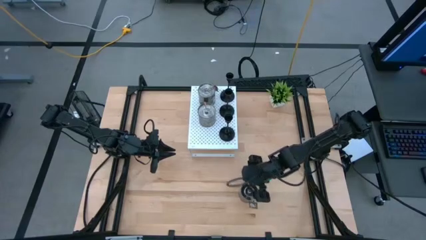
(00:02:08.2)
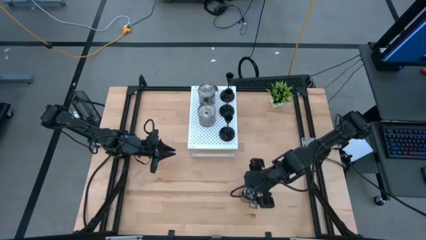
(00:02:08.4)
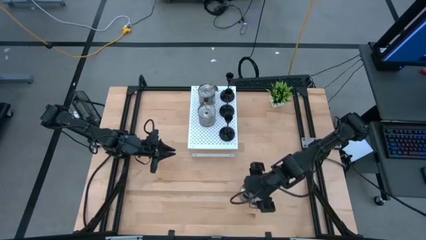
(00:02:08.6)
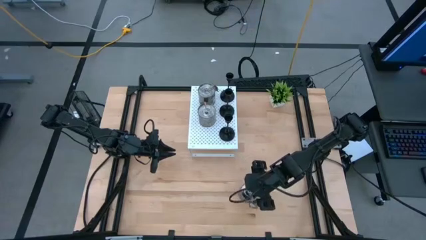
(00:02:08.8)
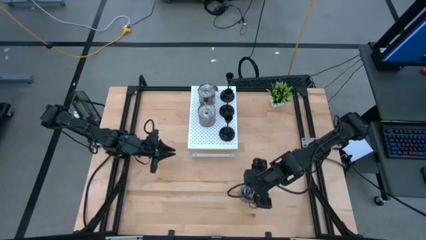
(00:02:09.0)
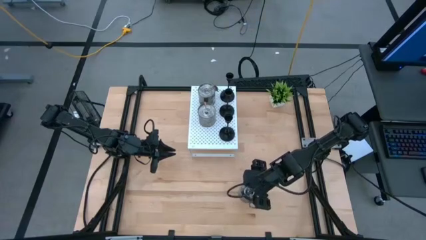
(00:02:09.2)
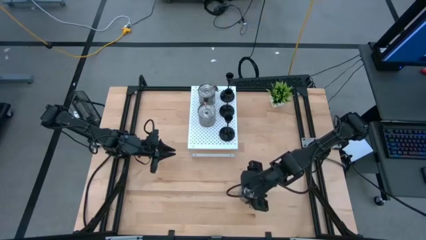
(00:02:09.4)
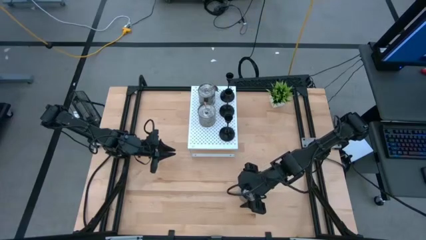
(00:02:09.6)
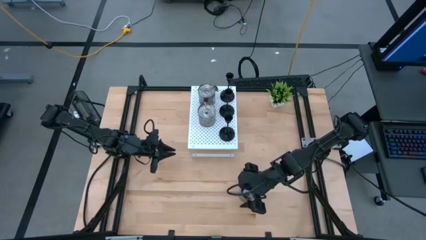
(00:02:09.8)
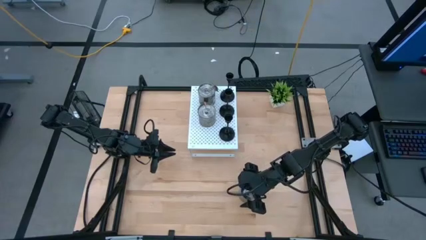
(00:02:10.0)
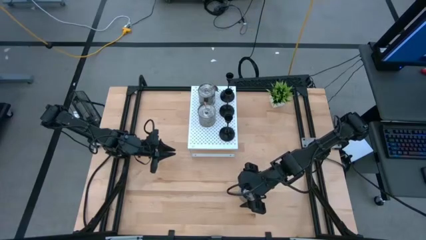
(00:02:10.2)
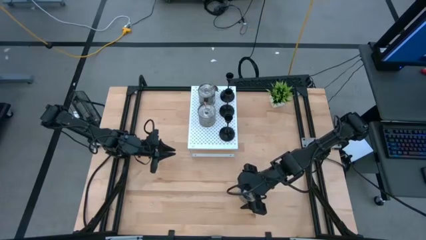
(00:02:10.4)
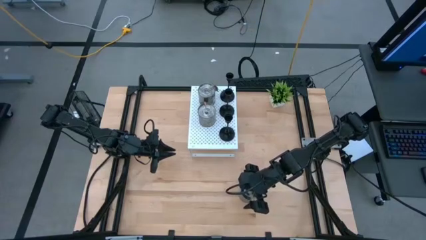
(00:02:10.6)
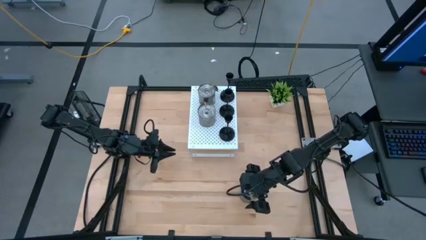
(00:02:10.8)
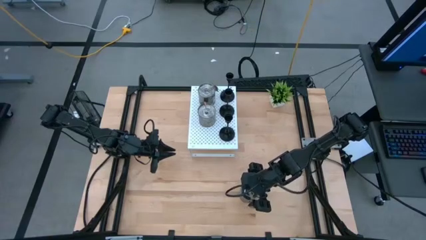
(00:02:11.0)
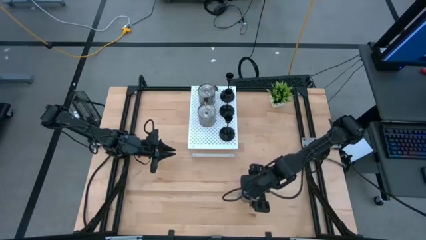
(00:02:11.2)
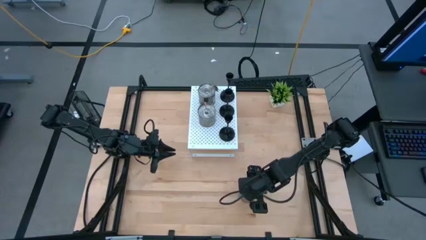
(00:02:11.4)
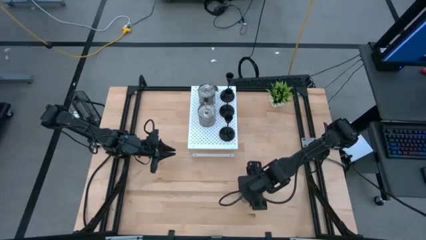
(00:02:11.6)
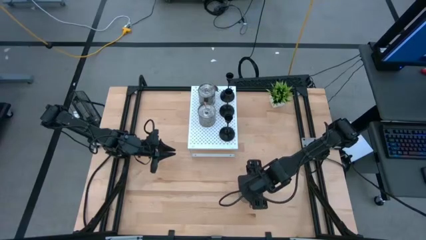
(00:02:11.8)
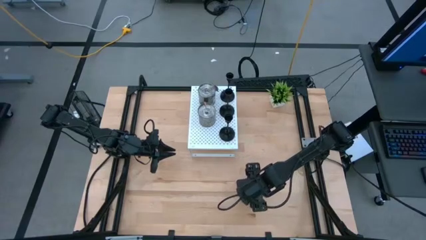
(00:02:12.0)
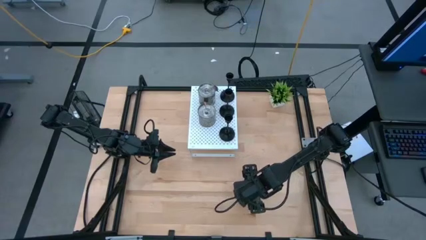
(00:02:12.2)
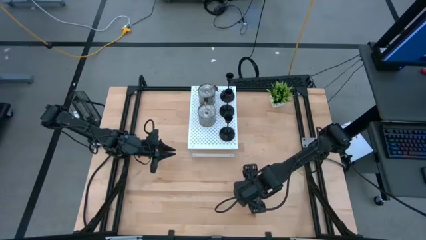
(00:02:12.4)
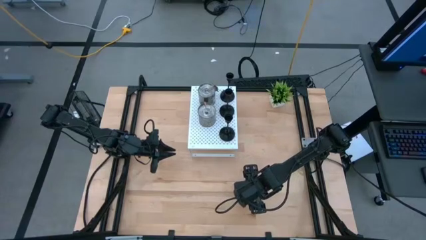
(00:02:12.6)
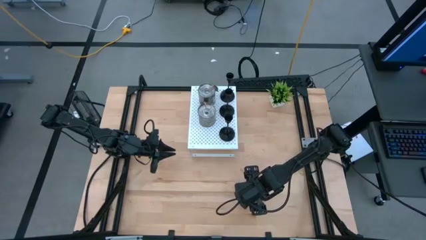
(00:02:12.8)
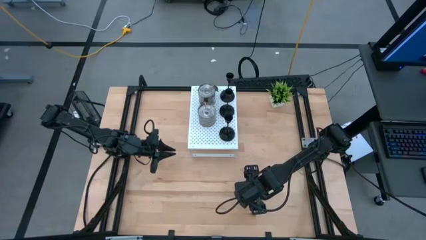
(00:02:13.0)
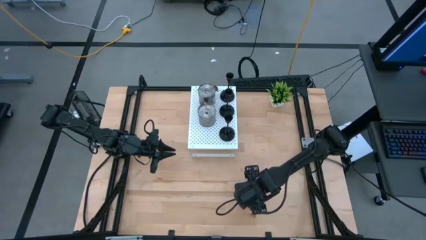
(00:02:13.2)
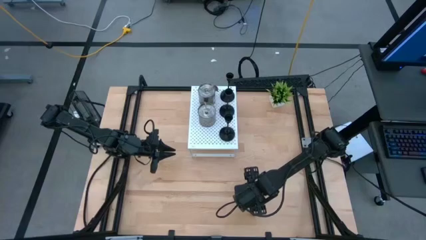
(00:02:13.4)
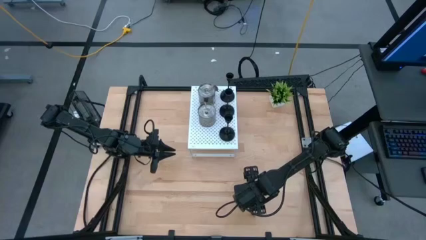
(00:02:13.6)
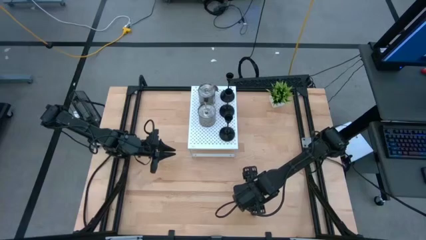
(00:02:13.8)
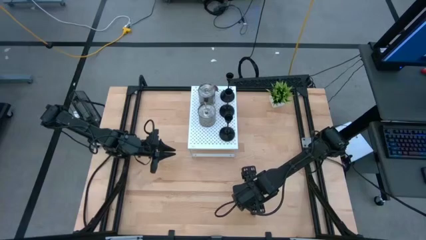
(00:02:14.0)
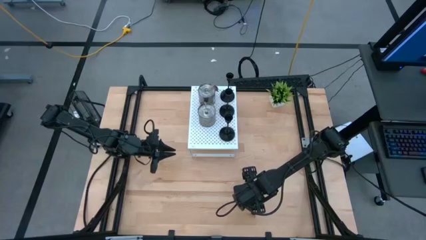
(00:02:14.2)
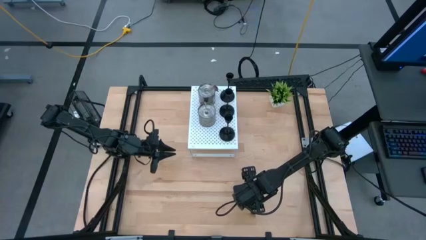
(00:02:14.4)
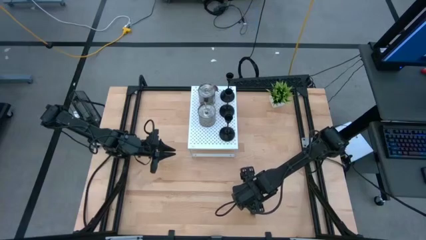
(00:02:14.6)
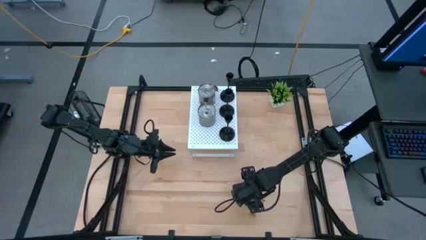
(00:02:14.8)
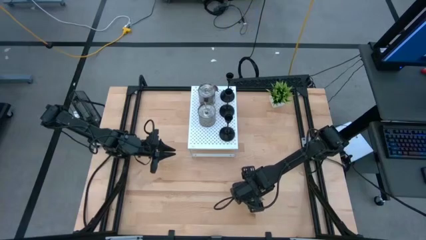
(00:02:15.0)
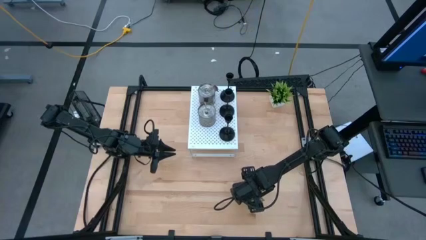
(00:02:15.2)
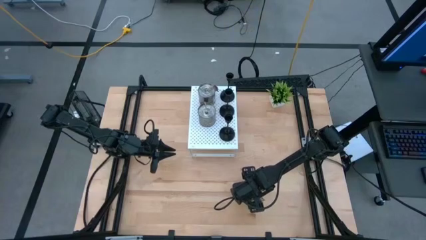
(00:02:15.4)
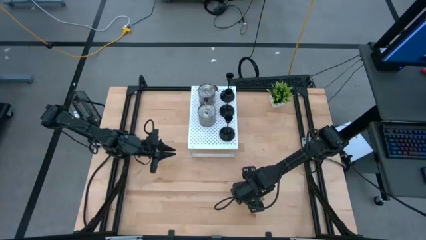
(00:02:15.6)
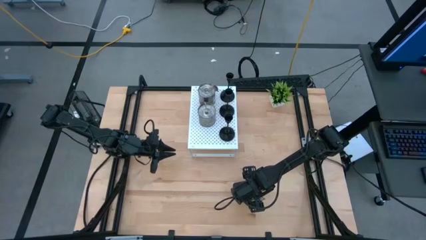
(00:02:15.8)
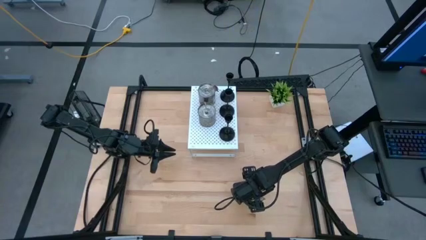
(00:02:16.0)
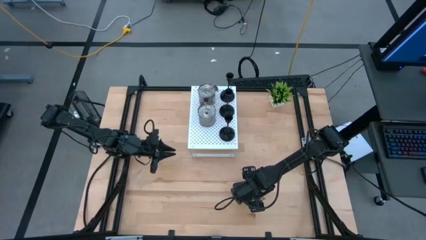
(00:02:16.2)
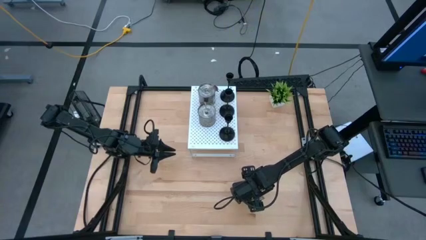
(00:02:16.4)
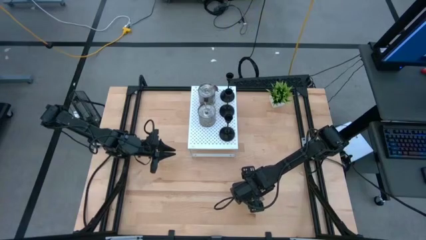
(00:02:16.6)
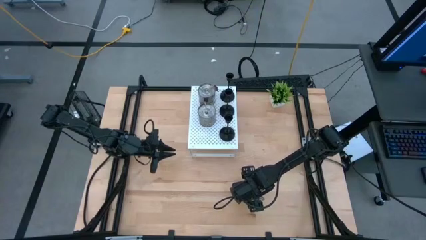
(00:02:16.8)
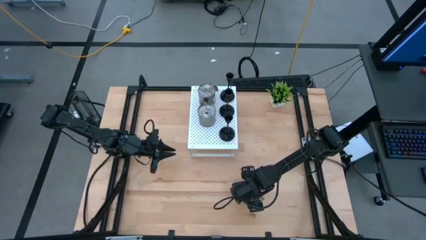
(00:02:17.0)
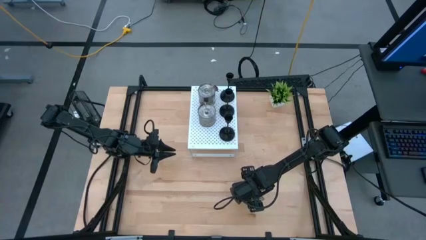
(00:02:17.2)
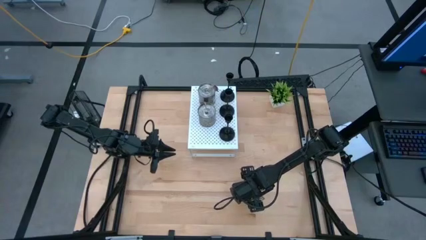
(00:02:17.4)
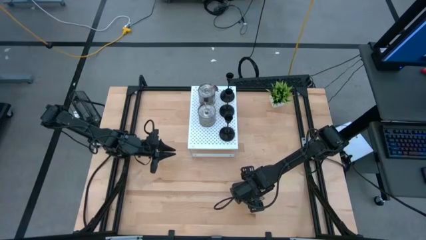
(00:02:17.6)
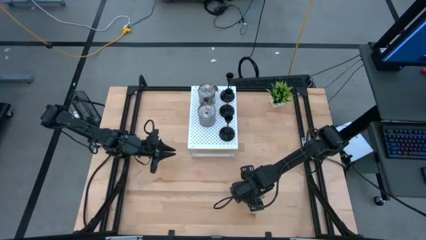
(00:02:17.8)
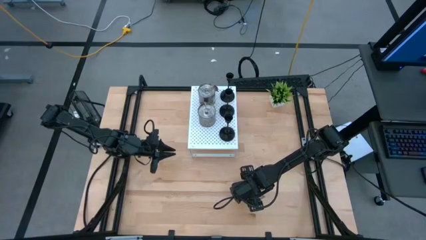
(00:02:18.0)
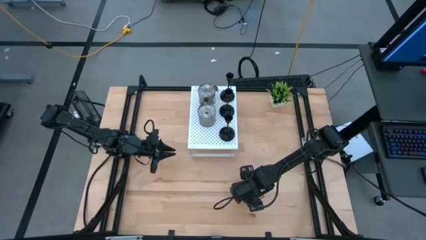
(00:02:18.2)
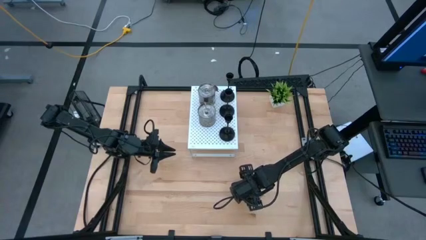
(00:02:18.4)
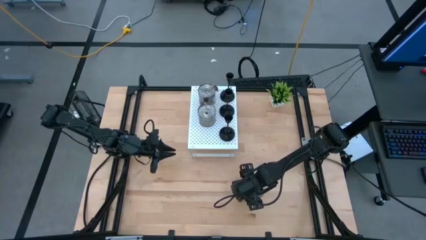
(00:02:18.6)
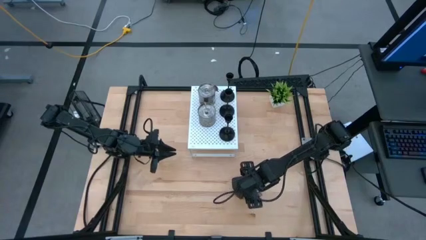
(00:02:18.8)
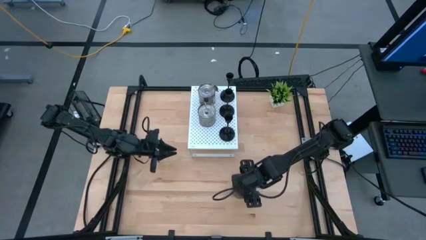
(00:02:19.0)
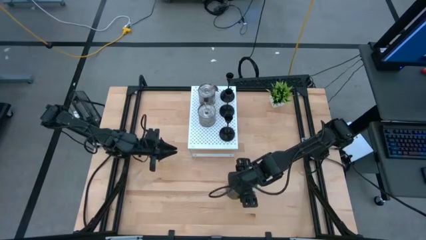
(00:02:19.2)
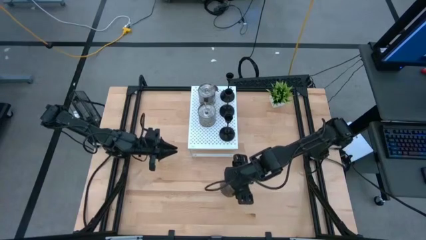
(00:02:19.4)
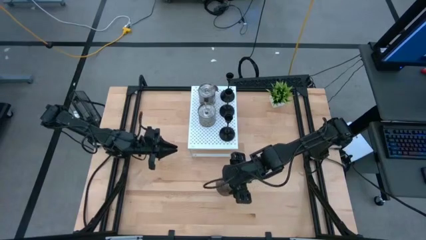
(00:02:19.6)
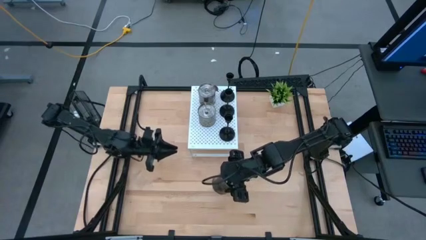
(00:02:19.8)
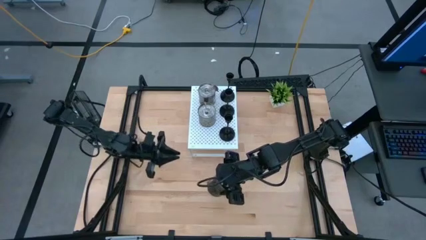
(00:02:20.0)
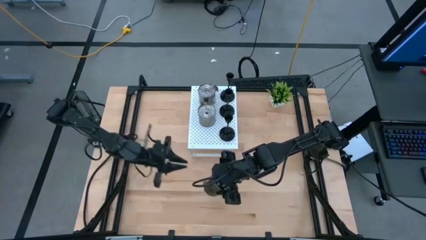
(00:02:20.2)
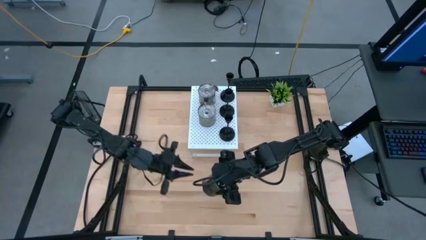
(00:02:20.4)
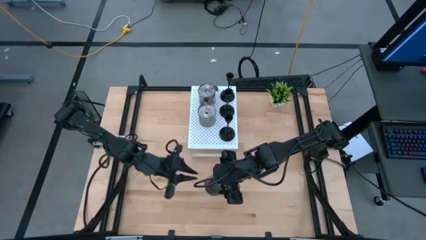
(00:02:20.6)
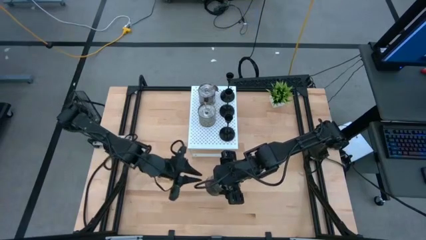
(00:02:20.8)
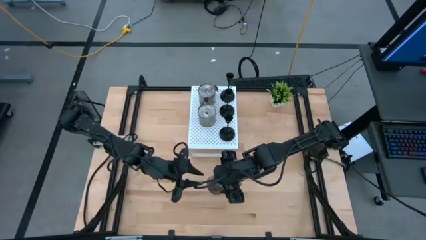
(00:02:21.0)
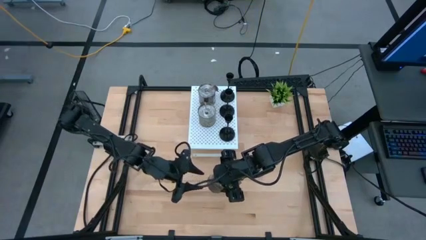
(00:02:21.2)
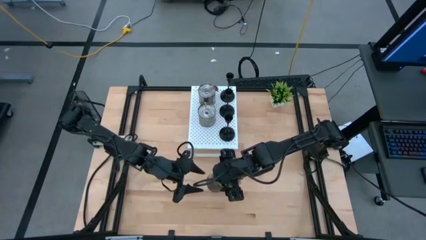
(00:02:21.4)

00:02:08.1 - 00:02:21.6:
Task: Pick & Place candle stick holders
Put the silver scented candle on the shelf aligned with the other silver scented candle

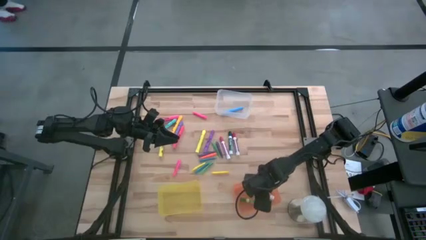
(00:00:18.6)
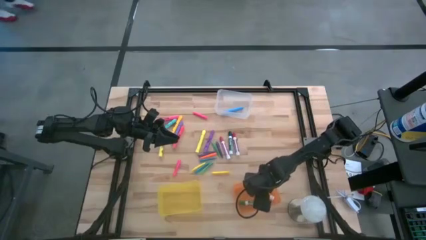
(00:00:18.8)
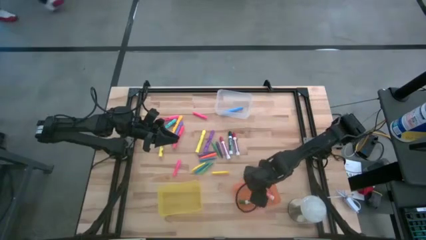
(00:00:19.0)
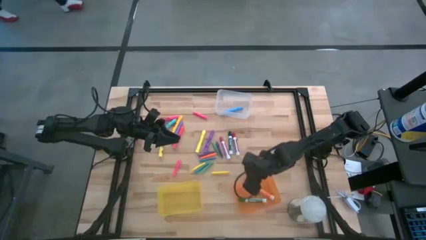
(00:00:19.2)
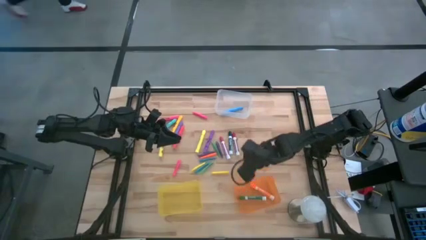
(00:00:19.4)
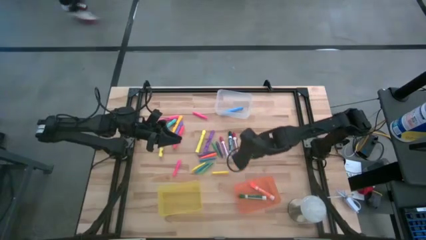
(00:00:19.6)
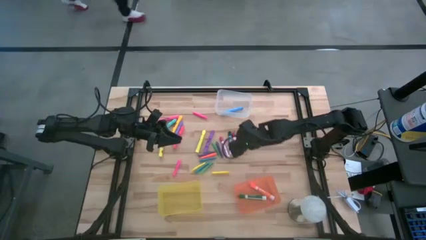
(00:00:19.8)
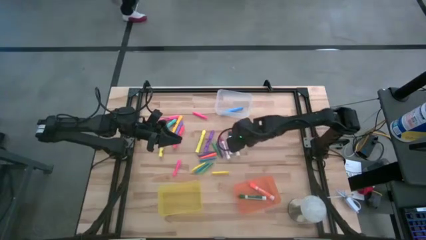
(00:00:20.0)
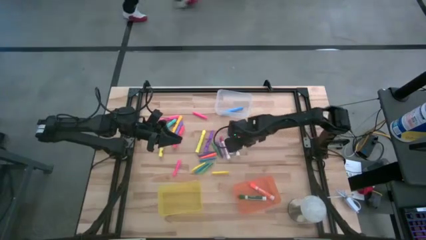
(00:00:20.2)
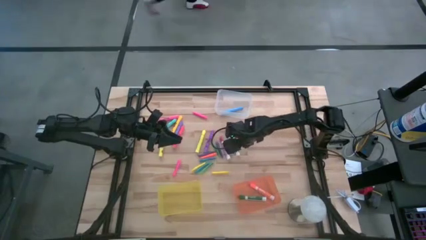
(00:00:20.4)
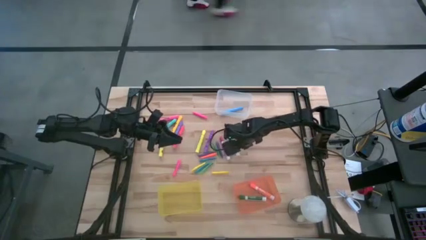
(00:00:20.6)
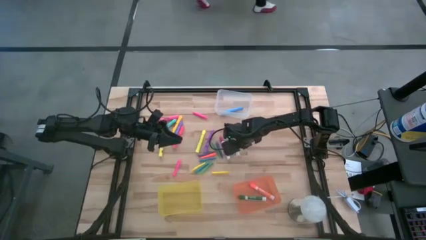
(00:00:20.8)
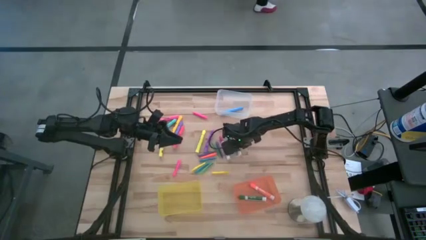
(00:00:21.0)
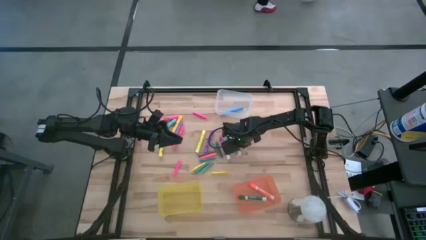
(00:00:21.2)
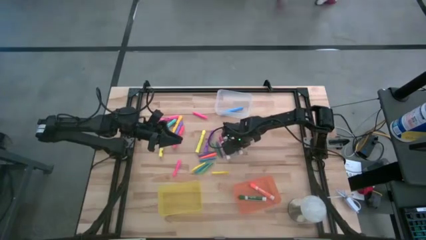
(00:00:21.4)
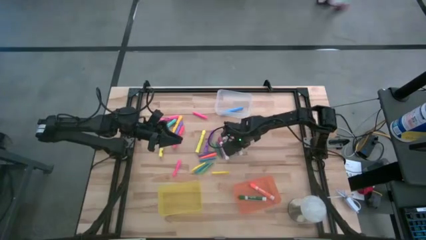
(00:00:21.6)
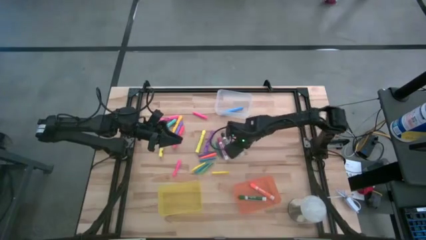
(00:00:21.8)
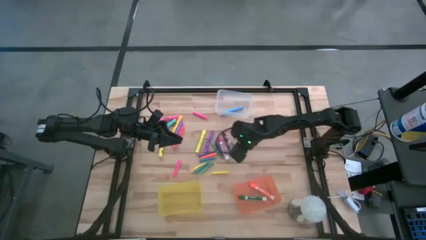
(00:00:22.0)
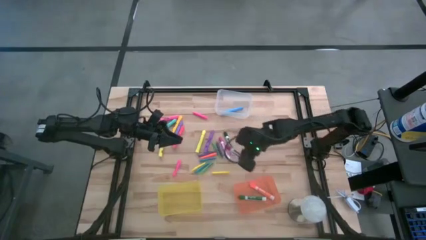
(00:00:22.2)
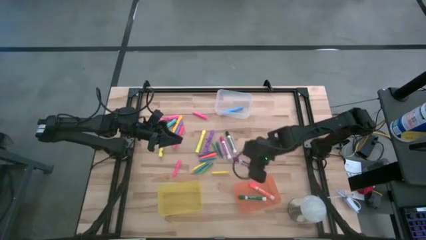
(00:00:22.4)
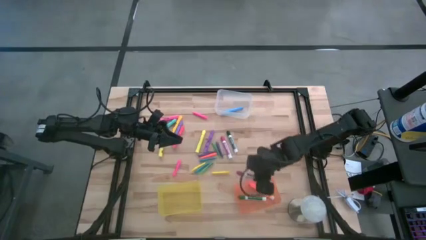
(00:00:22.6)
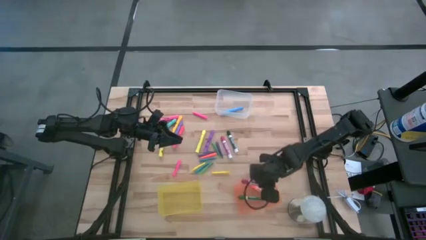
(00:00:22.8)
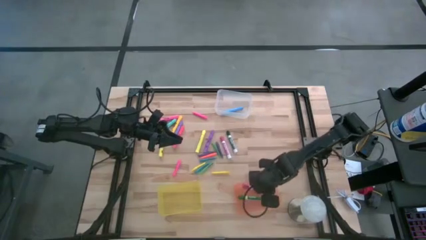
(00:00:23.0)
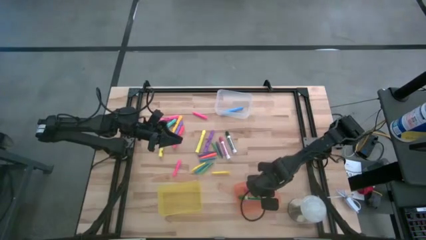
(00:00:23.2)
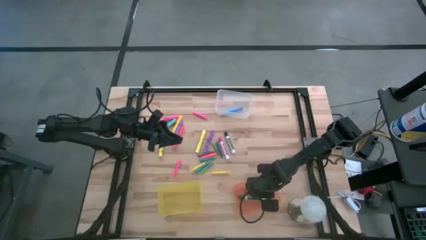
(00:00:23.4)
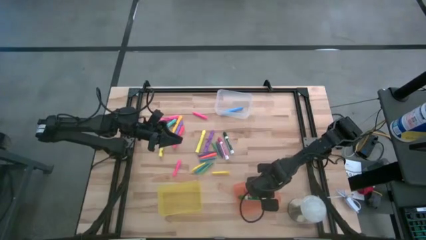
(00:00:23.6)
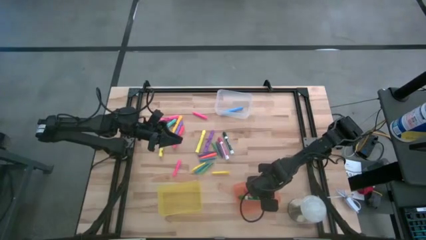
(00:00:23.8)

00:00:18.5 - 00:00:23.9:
Task: Pick & Place Markers
Put the red marker pen into the orange bin
